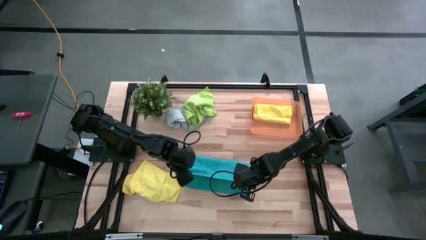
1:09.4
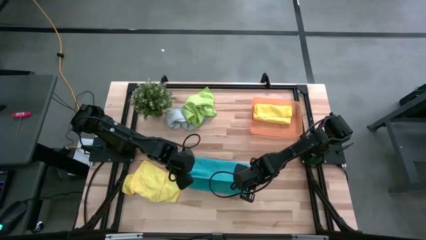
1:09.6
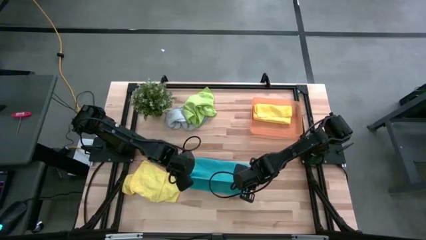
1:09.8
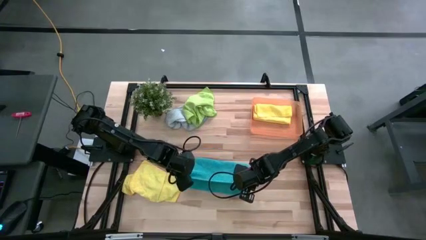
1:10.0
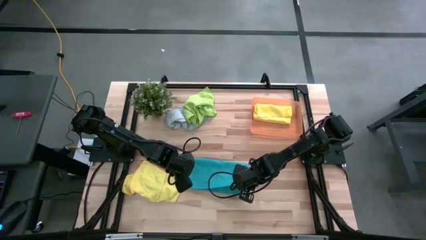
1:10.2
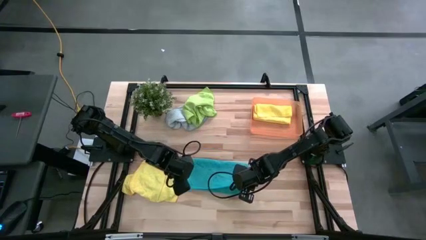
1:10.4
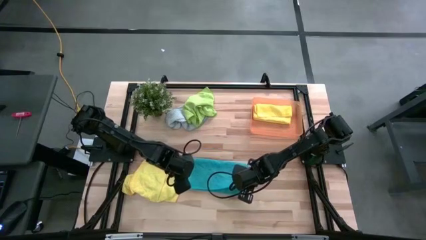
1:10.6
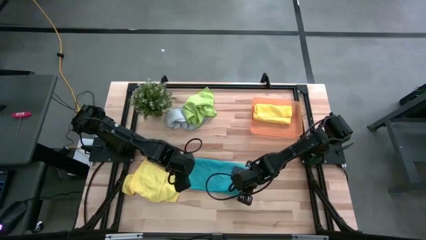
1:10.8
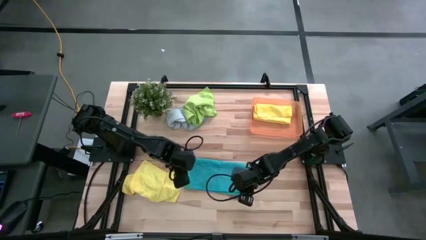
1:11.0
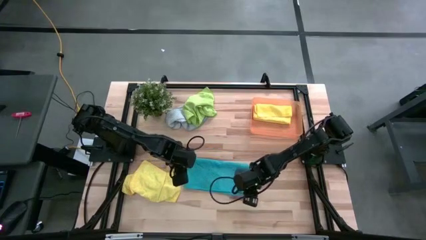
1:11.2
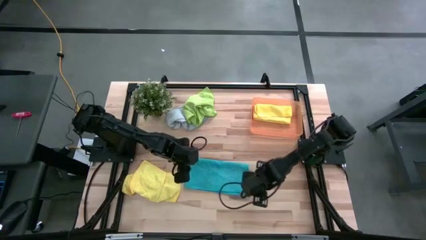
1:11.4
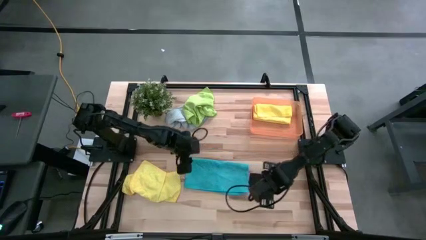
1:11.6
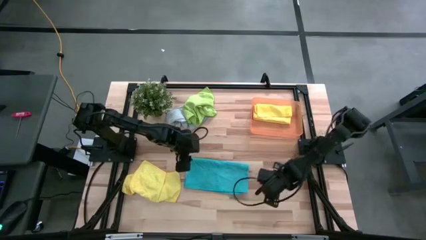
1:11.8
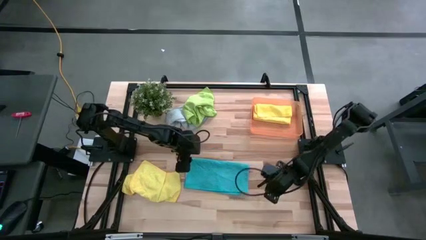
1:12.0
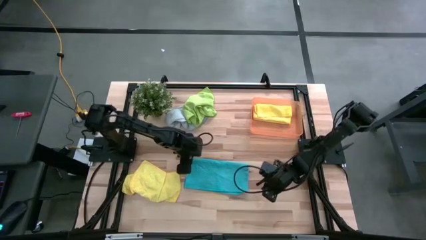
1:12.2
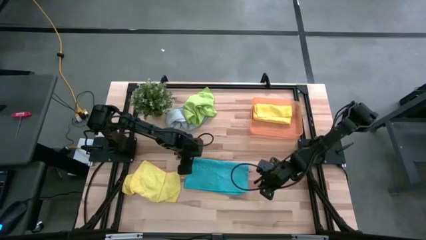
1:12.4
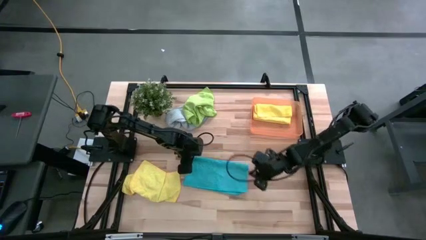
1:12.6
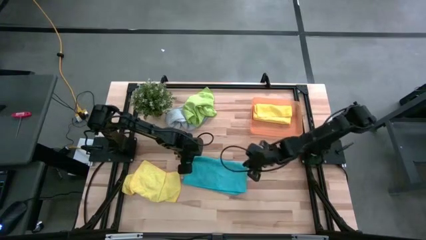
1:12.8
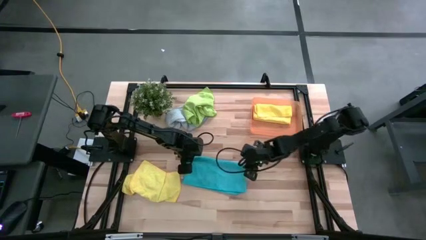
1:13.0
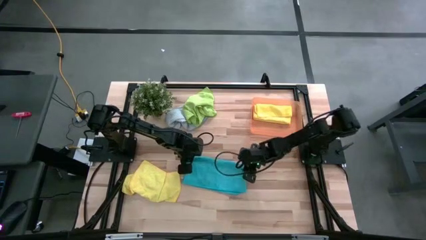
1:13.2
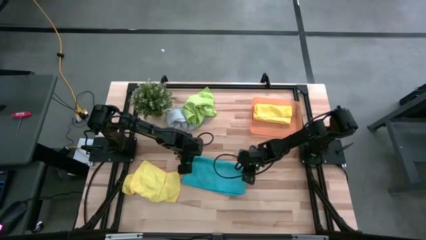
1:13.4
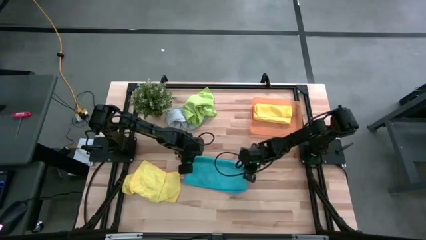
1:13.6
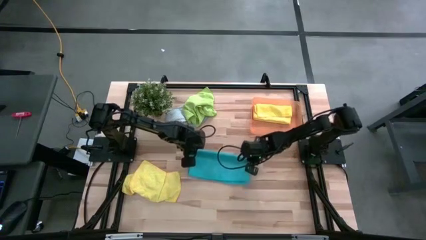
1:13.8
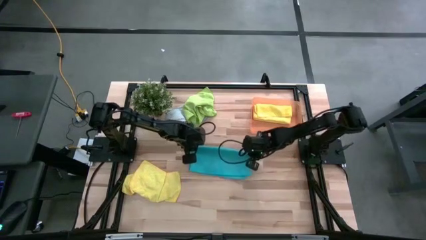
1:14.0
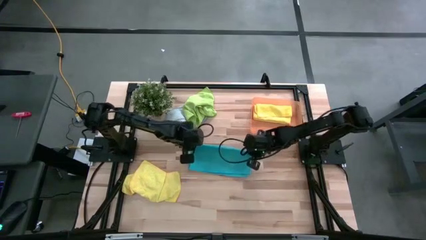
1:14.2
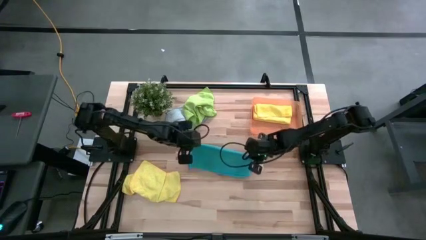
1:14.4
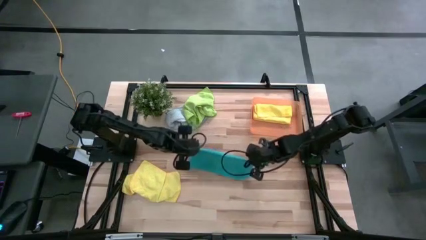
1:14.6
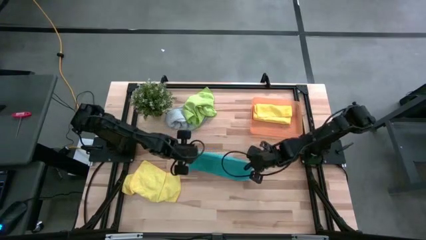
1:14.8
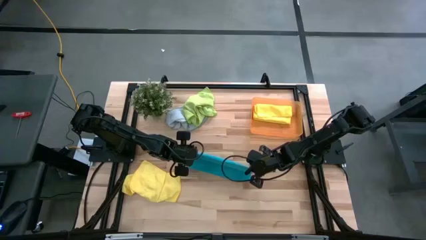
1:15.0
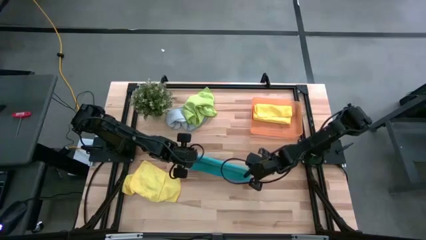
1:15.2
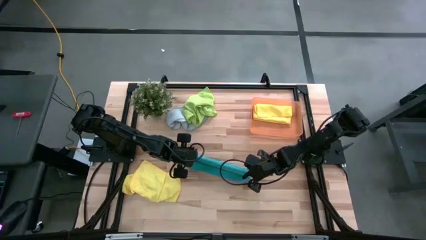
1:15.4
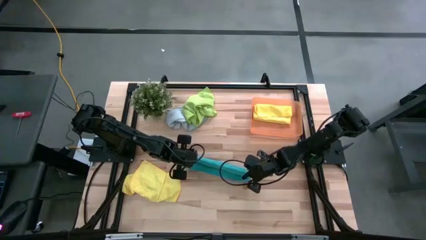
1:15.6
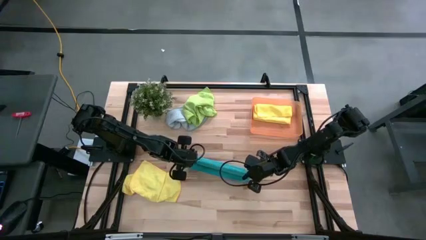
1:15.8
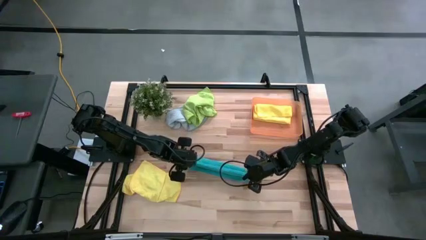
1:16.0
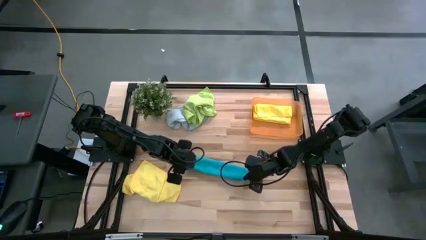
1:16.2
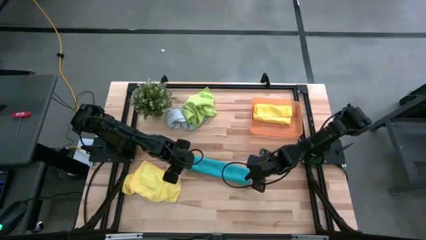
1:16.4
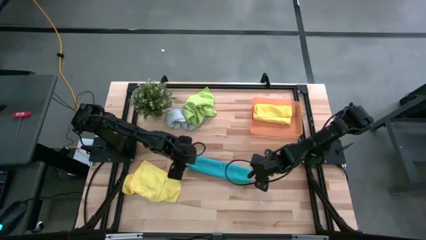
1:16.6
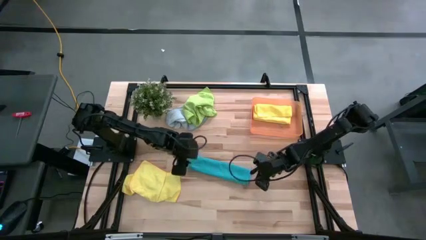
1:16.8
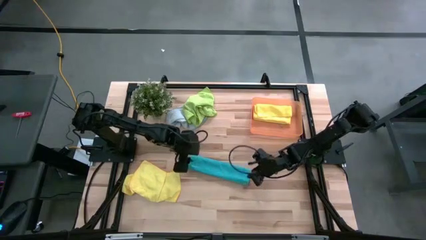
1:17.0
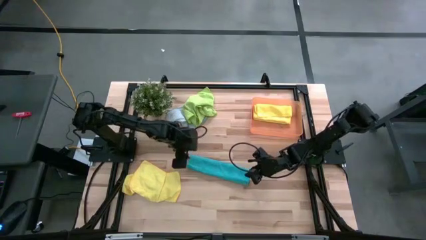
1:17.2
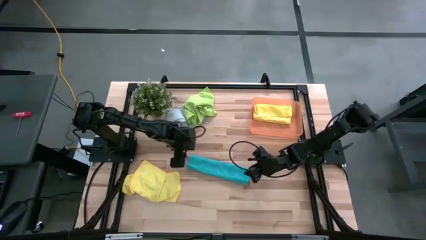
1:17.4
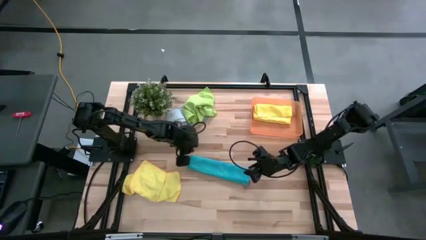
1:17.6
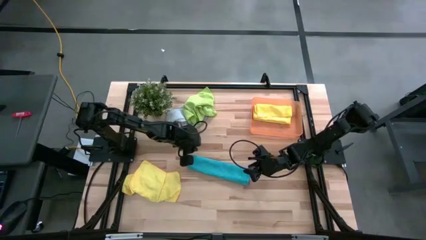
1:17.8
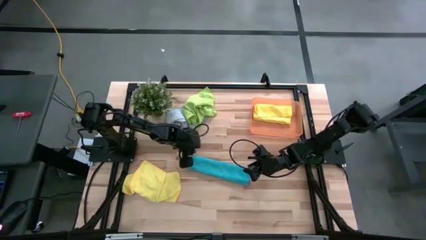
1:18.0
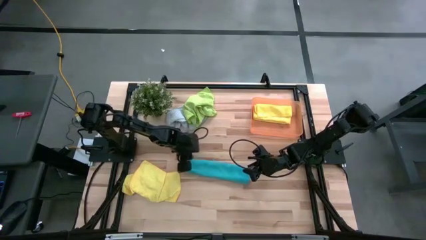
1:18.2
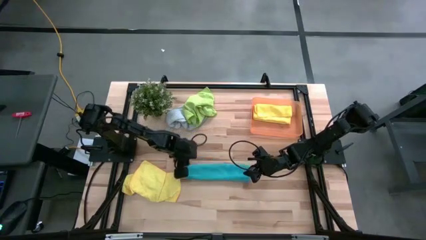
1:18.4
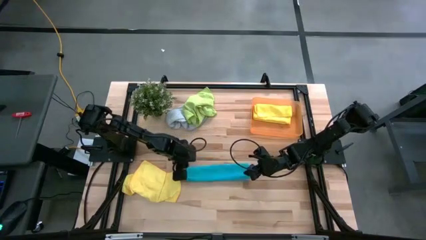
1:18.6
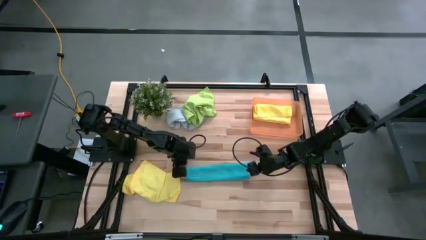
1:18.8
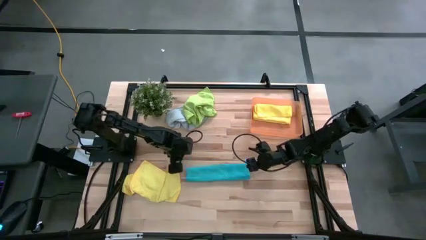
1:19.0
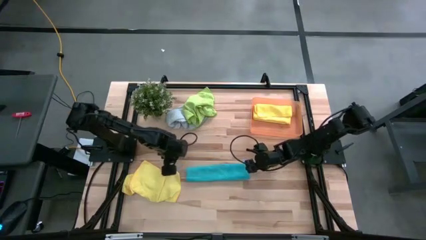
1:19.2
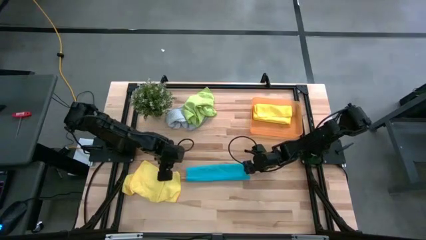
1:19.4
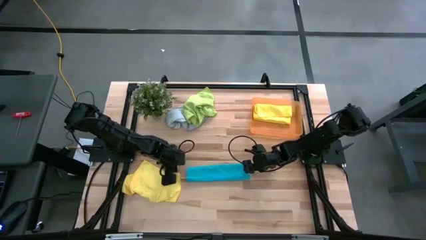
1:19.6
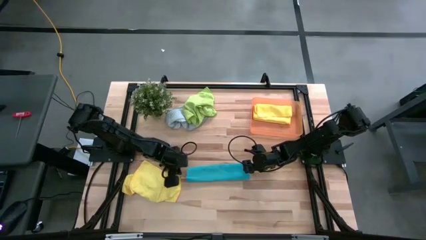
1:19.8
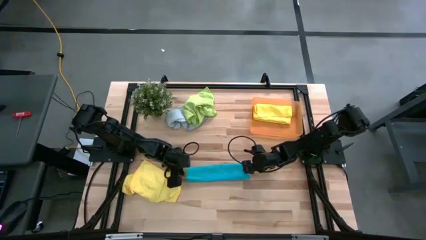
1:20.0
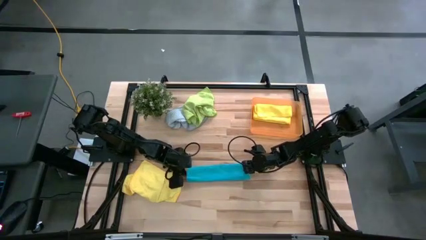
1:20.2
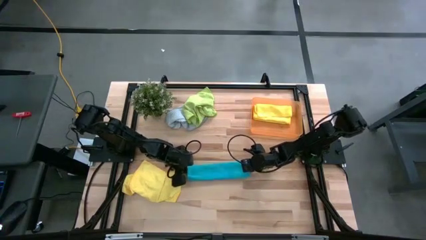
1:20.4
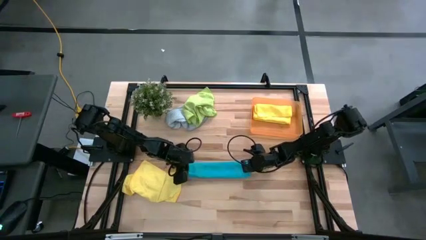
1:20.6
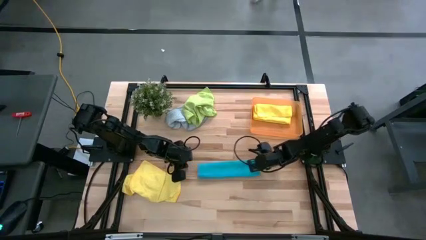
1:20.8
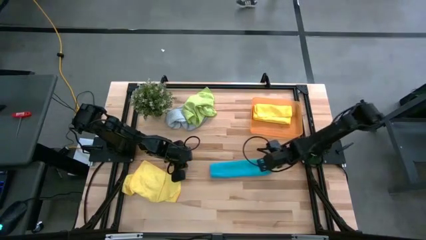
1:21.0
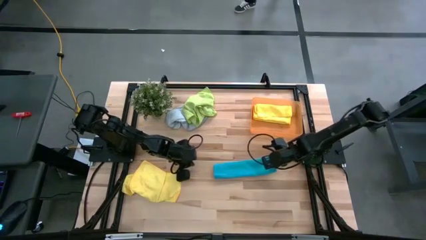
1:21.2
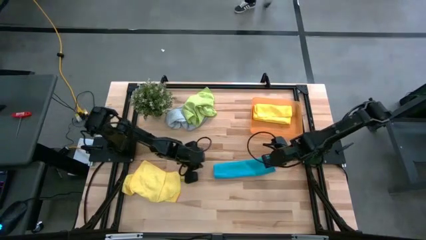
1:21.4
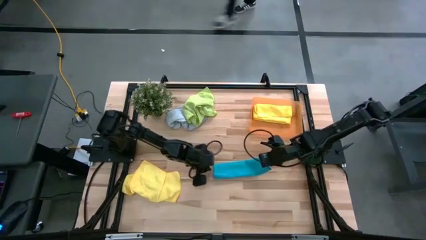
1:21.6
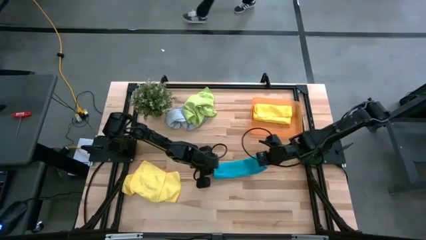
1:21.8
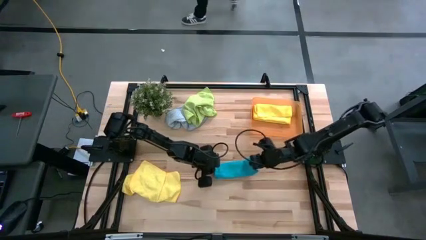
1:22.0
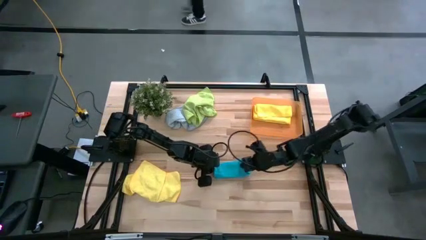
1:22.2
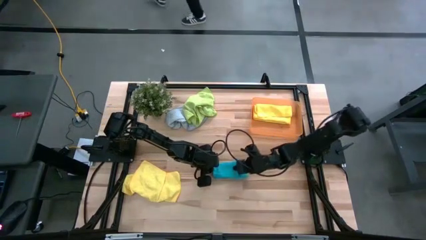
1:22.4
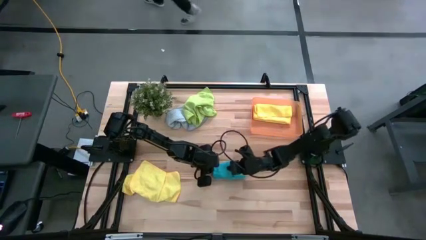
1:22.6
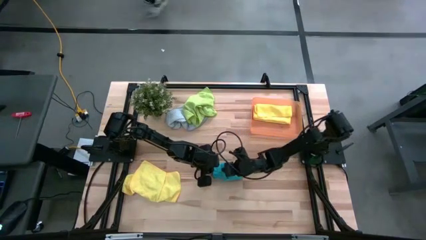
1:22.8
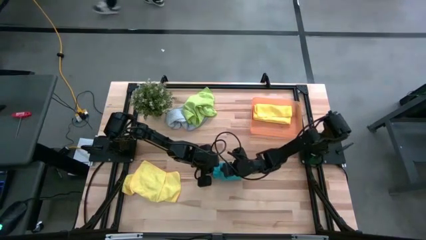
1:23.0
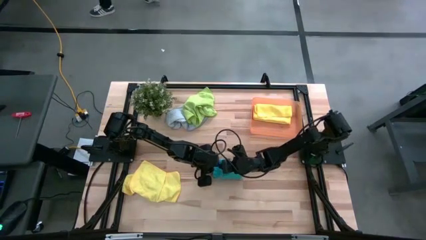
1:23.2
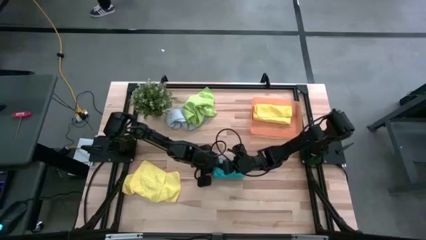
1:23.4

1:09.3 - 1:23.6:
Task: Fold microfiber towels
Fold the blue microfiber cloth

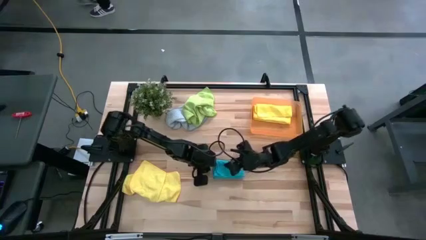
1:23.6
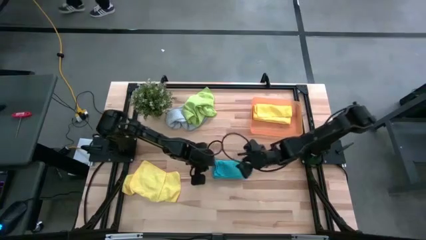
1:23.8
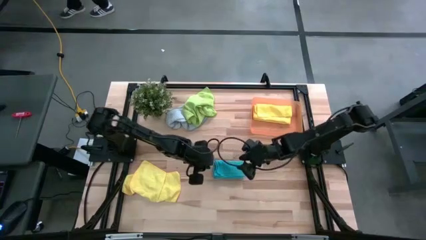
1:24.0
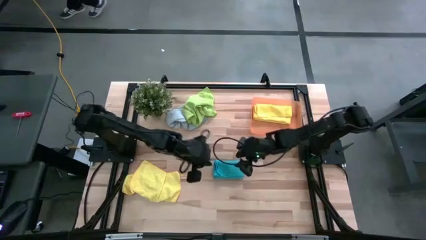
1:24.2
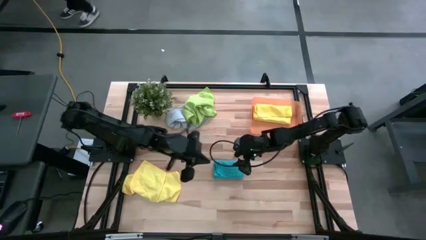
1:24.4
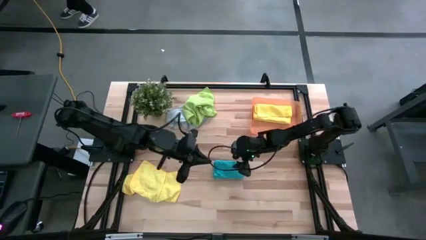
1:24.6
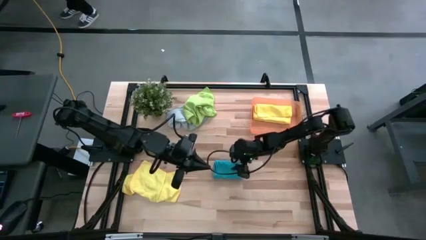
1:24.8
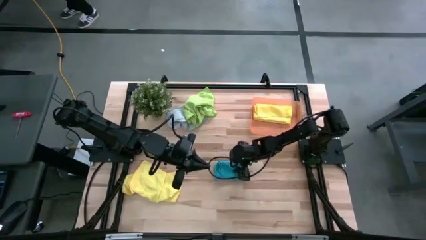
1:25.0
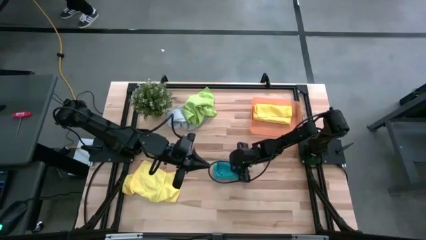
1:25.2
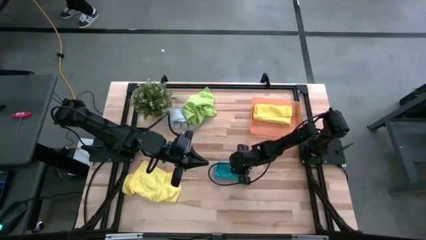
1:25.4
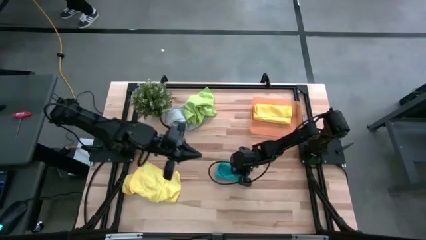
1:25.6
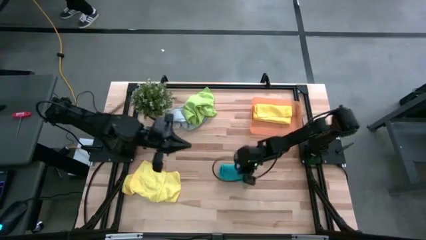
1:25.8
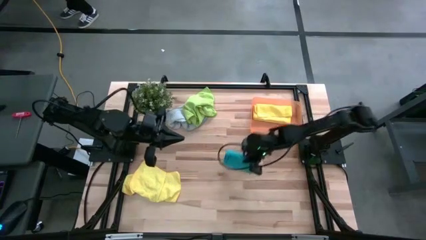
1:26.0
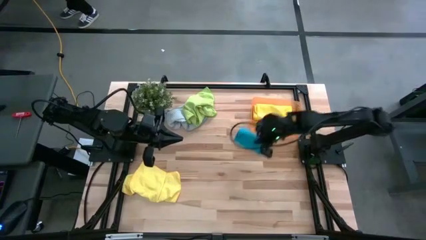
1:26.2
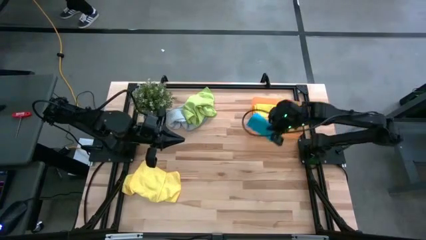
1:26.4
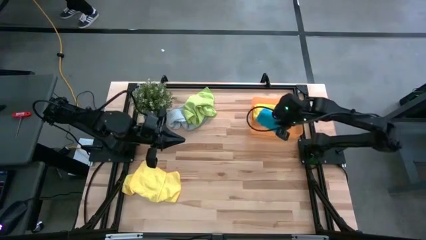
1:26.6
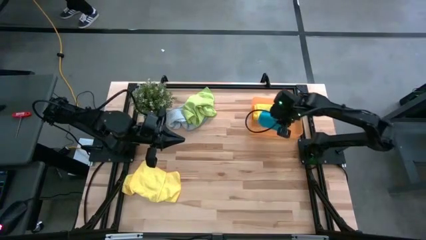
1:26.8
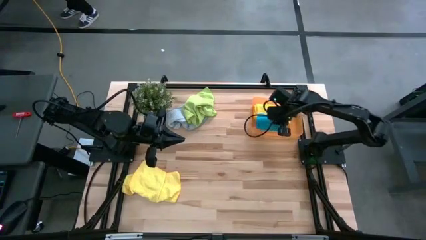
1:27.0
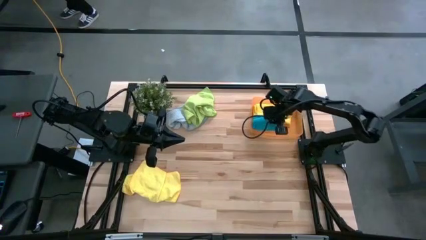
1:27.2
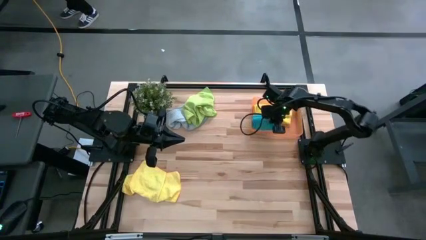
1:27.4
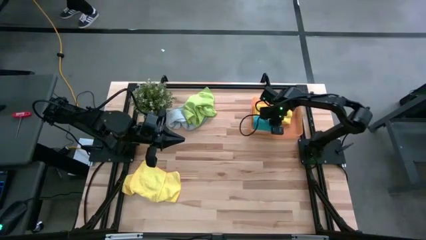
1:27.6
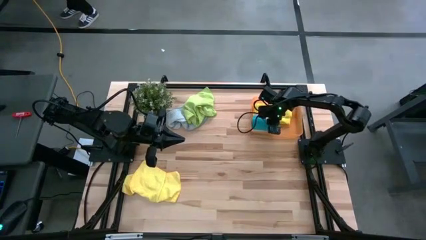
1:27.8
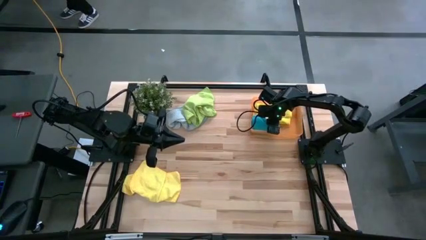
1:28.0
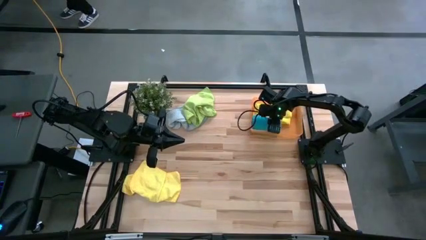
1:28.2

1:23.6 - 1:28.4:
Put the blue microfiber cloth into the orange bin
